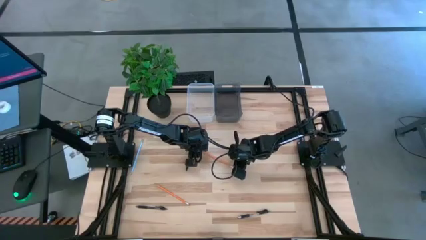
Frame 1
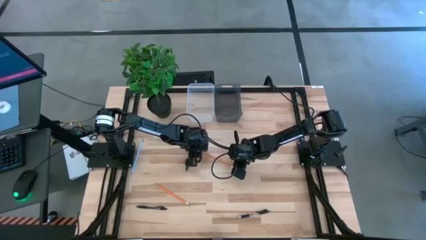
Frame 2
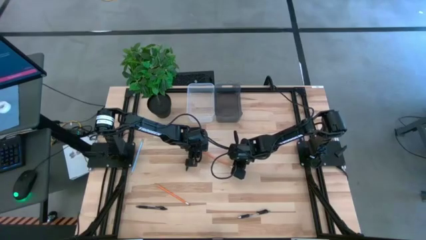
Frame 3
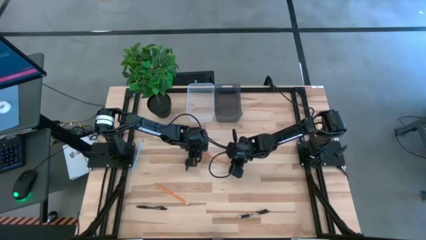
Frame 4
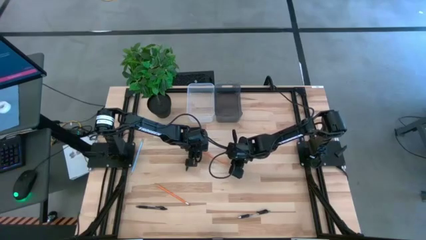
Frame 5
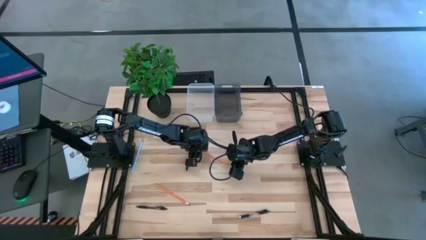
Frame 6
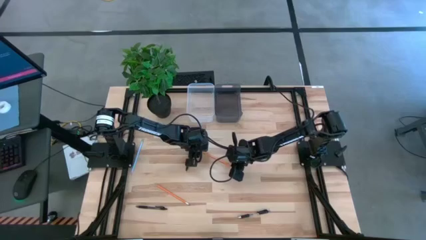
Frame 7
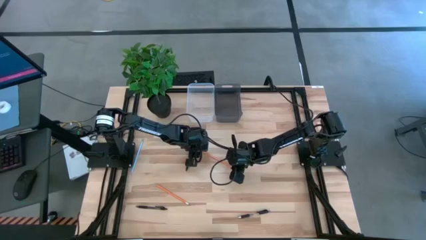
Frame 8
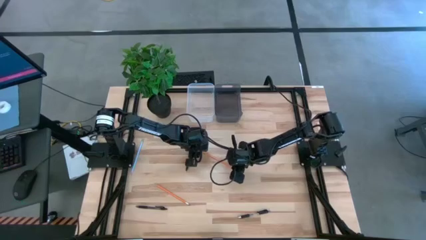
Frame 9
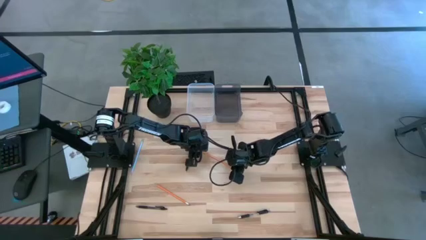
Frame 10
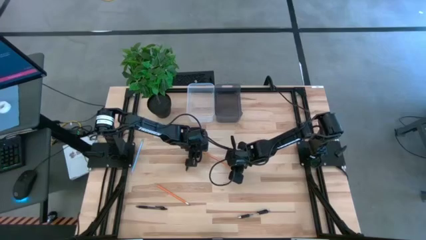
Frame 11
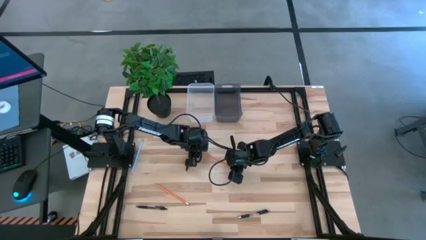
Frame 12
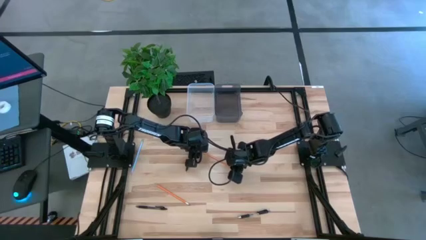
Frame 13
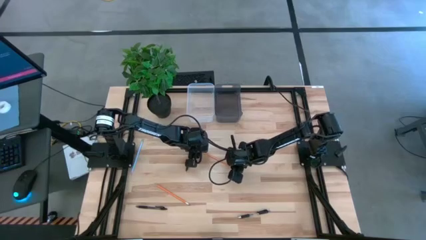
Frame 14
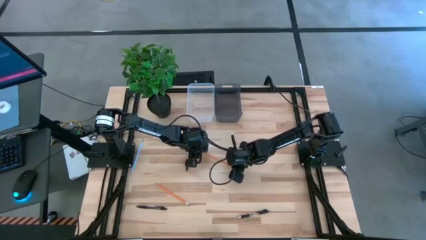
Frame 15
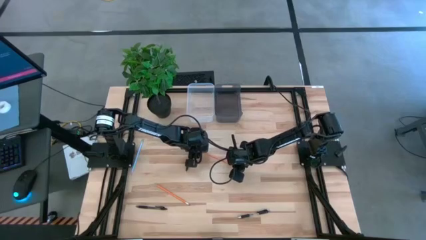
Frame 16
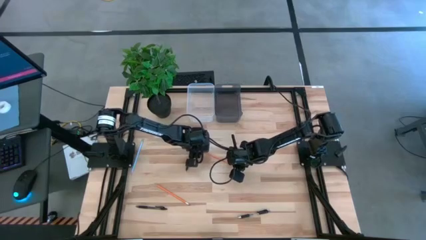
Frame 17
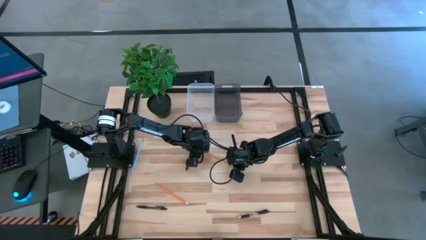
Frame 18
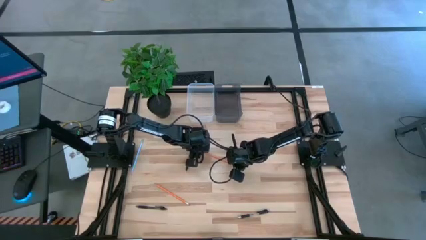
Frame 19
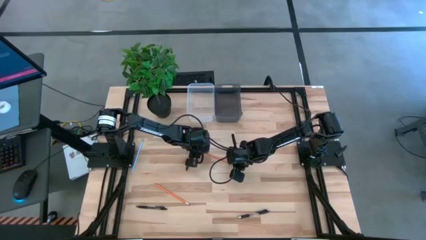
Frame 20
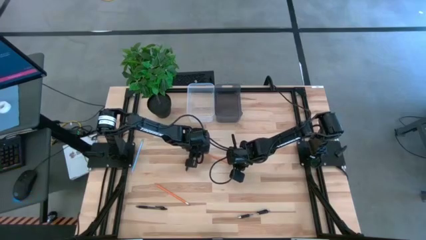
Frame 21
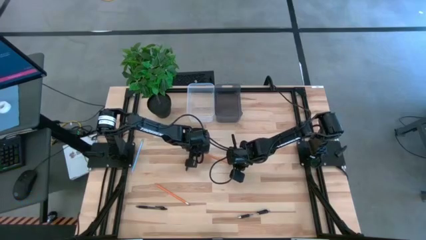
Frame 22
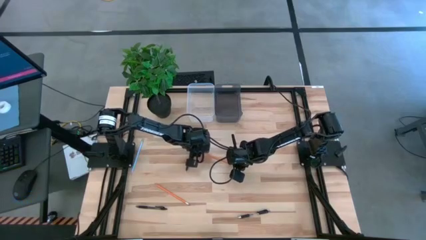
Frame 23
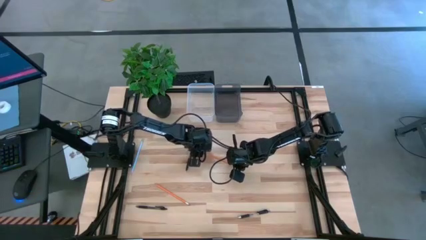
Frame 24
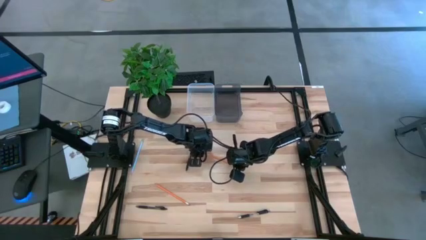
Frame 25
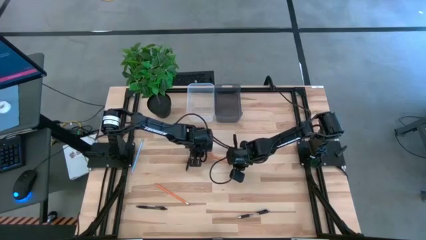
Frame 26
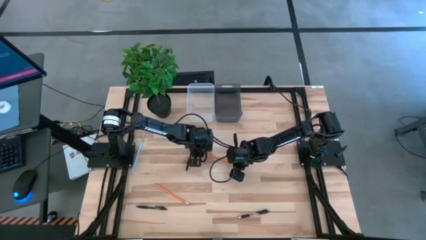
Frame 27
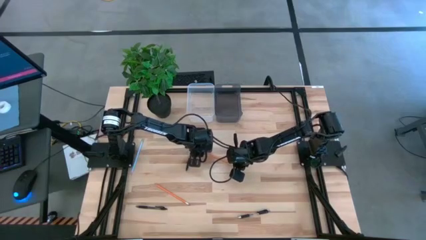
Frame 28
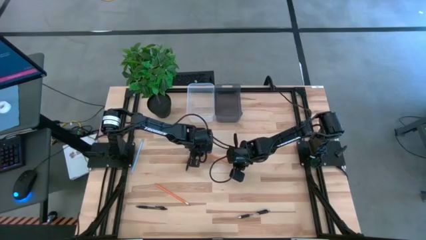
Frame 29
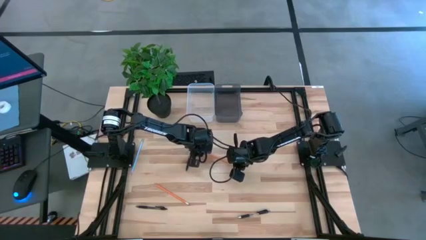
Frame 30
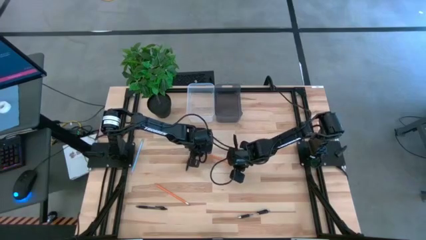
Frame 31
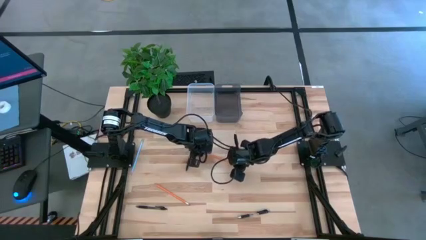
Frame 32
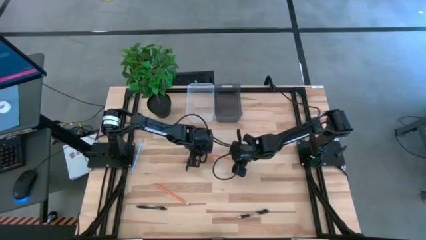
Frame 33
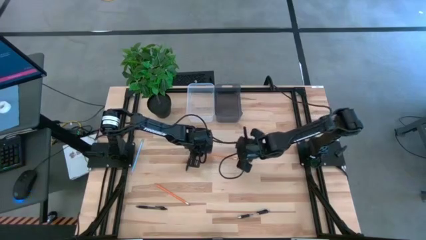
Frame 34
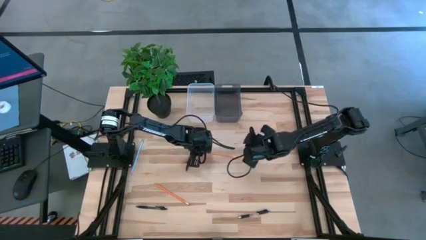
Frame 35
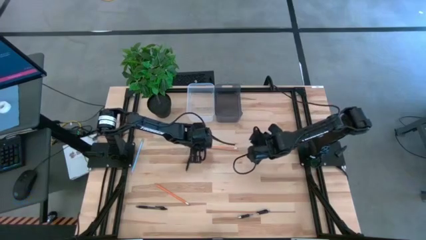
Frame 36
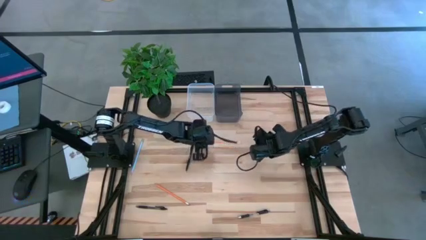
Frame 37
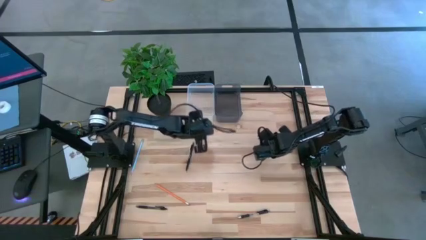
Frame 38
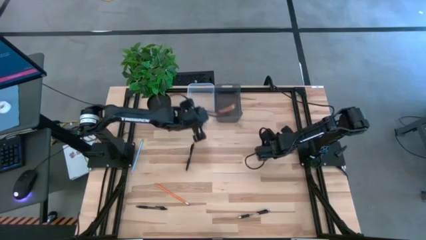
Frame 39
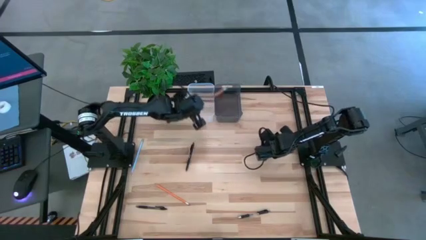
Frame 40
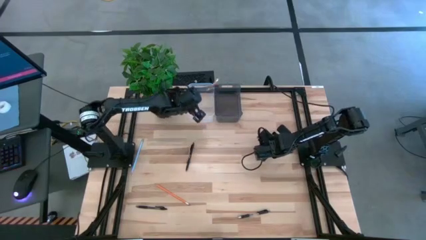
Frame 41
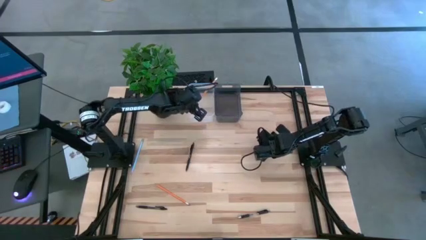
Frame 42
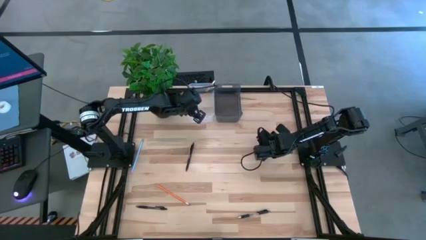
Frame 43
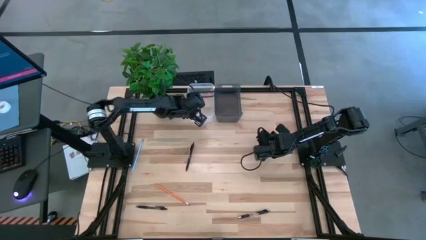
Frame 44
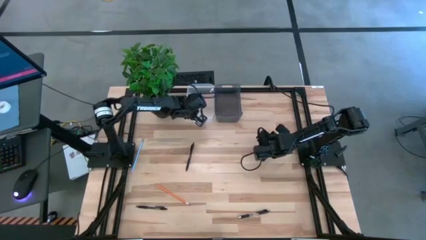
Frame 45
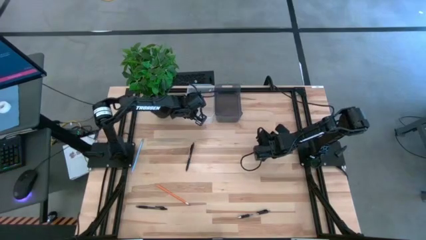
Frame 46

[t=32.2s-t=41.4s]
Task: Sort pens & pencils
Put the top orange pencil into the transparent bin

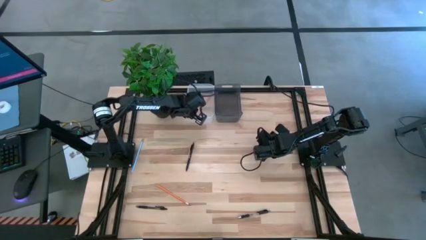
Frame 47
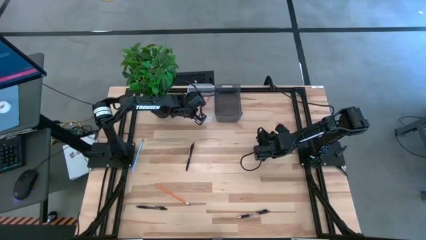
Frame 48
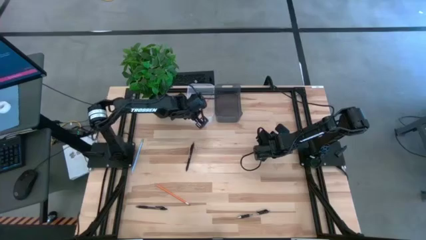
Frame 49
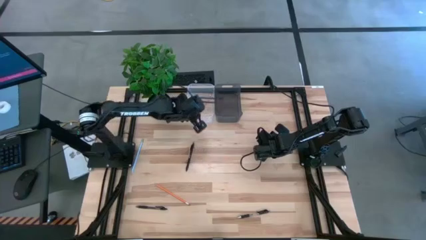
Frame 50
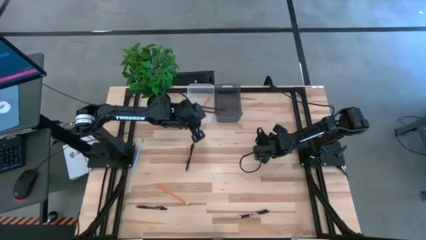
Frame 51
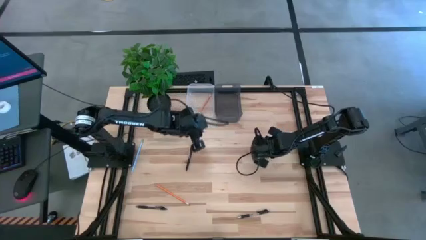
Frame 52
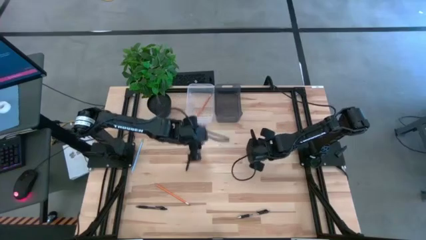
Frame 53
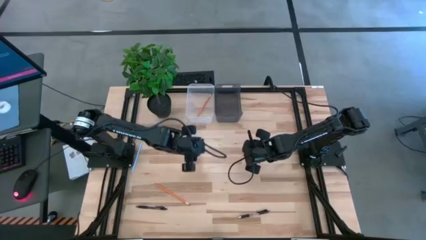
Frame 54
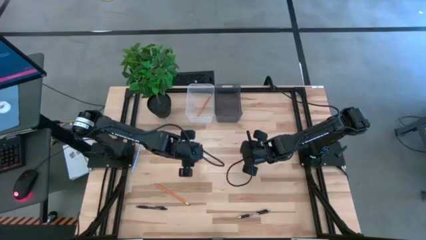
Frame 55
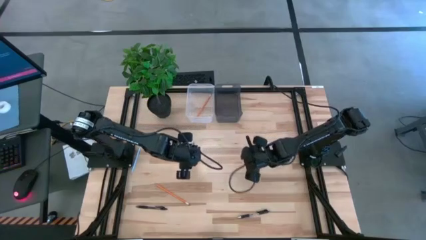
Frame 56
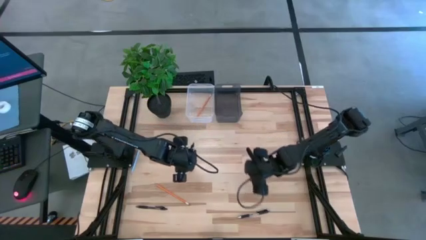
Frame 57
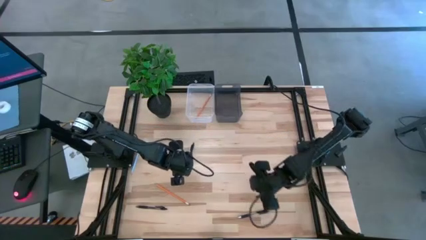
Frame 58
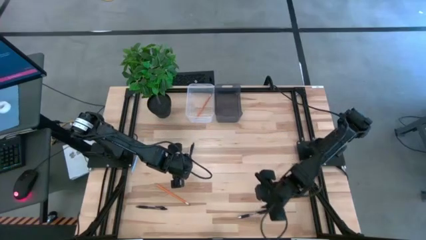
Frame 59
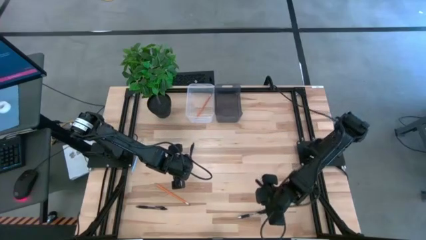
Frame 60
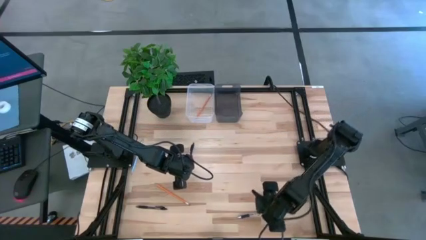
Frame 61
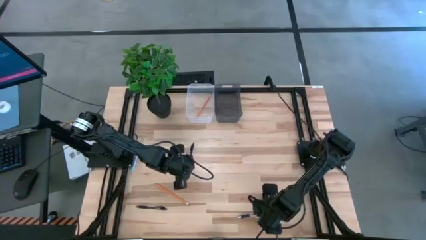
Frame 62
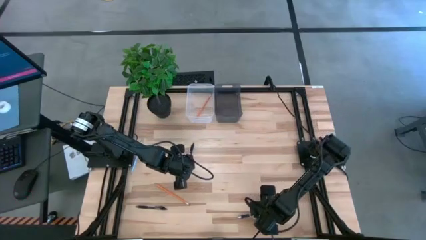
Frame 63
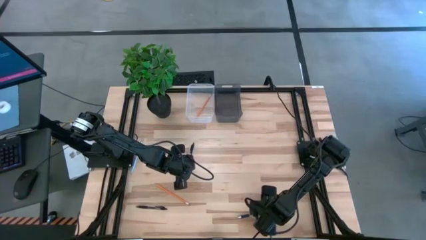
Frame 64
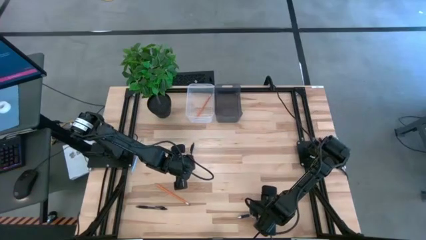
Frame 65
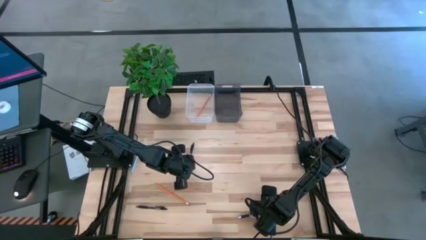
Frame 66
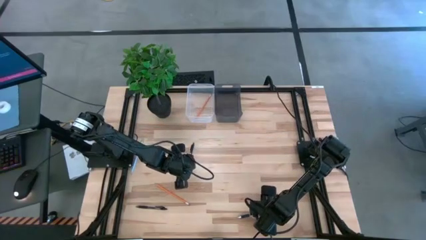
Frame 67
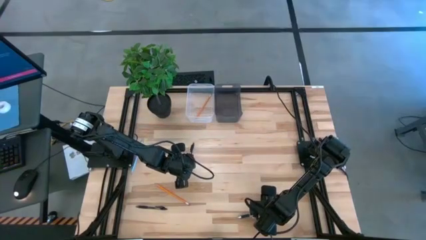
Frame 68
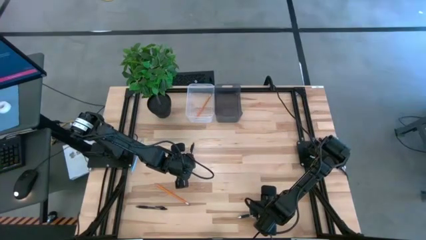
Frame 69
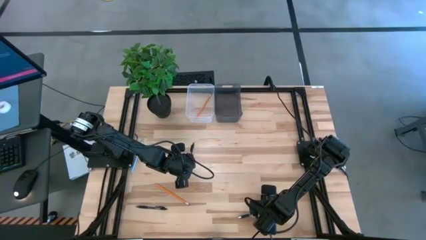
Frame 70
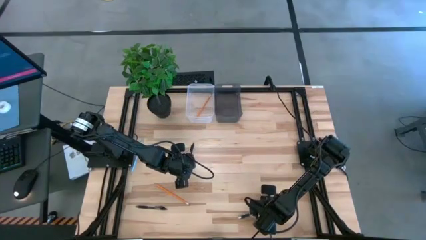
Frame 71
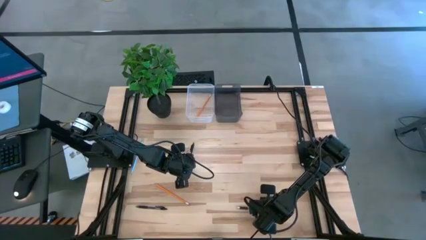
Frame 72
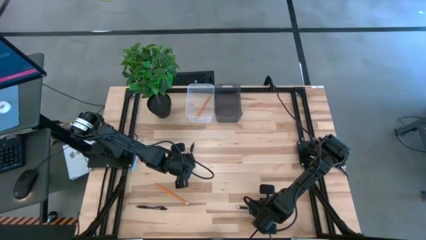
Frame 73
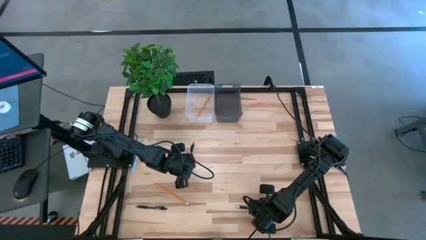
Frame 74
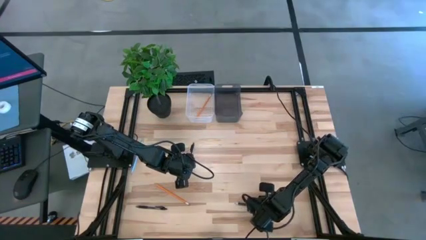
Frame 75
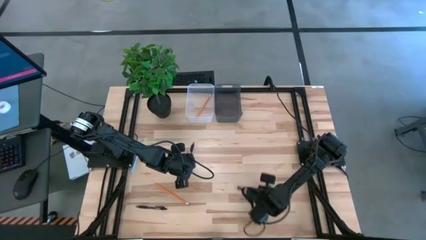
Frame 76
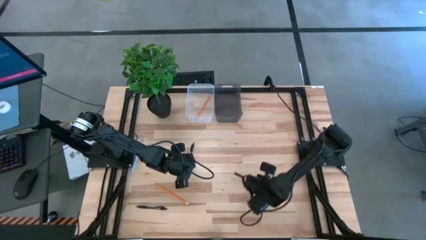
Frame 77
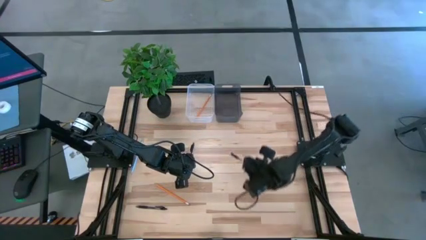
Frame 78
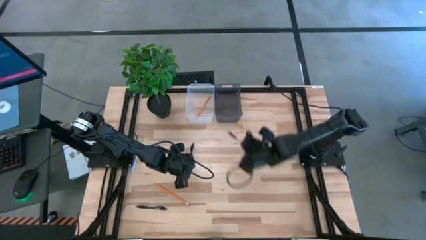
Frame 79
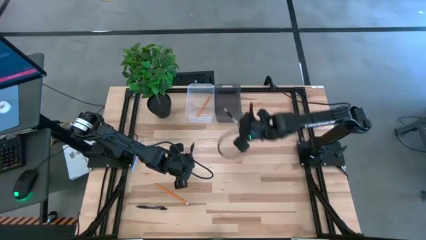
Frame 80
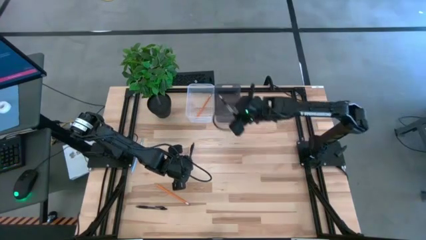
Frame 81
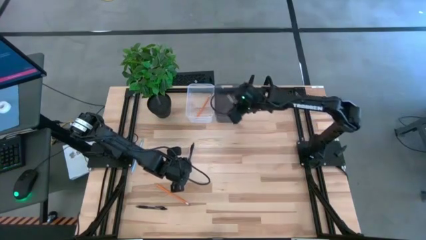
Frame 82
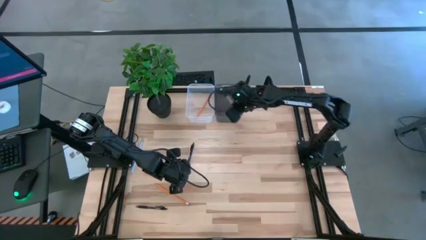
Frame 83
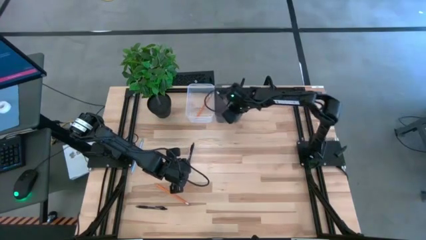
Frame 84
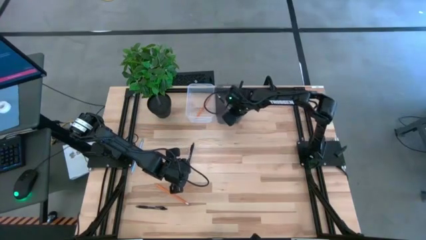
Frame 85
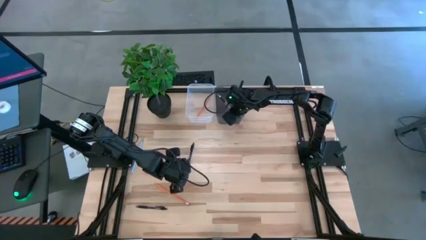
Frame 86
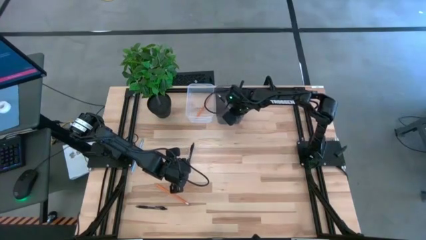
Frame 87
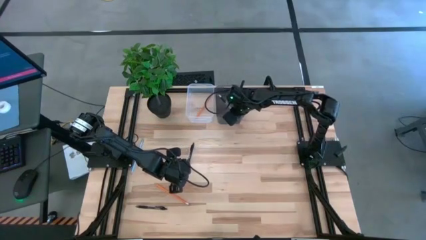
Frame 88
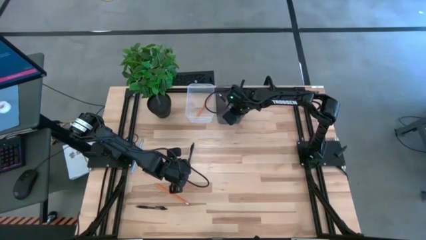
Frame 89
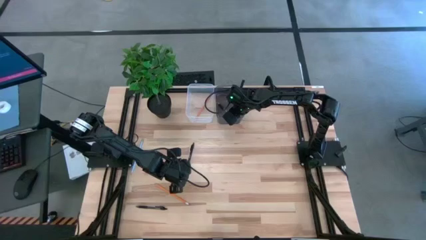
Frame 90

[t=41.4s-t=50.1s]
Put the bottom right black pen into the black bin
